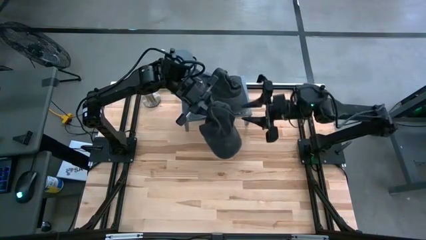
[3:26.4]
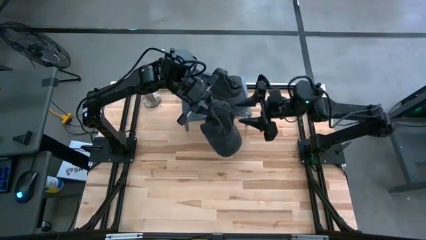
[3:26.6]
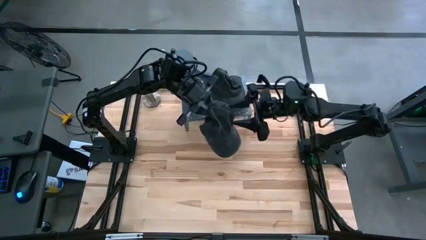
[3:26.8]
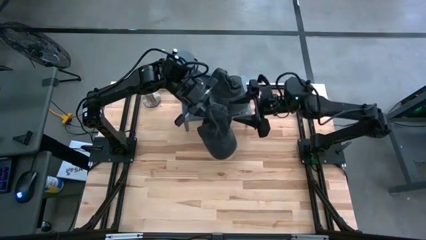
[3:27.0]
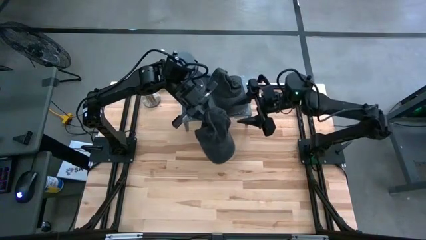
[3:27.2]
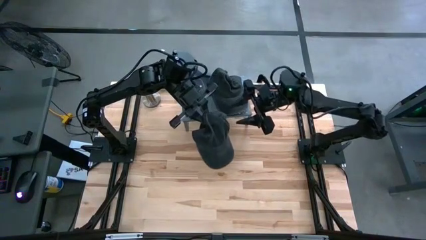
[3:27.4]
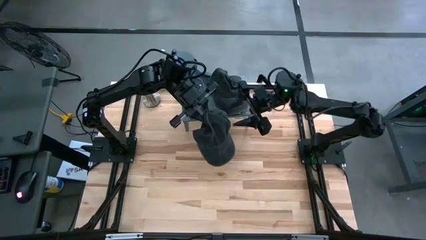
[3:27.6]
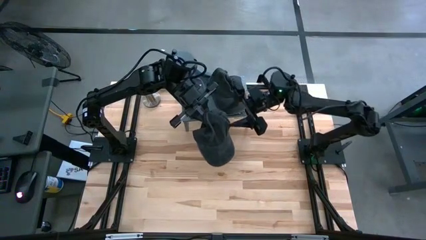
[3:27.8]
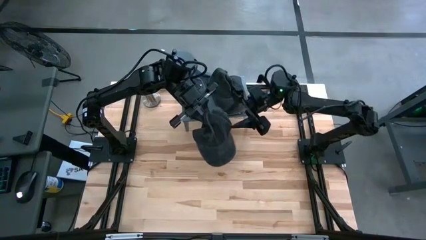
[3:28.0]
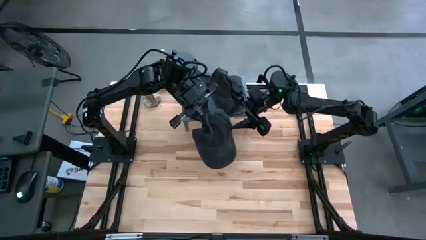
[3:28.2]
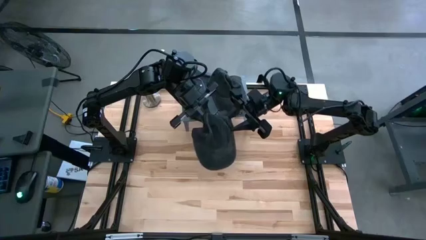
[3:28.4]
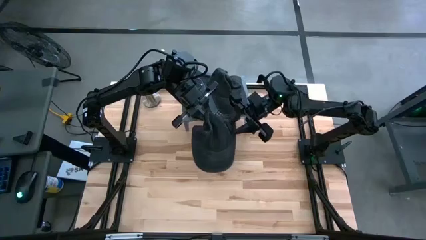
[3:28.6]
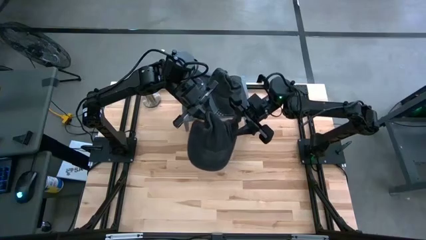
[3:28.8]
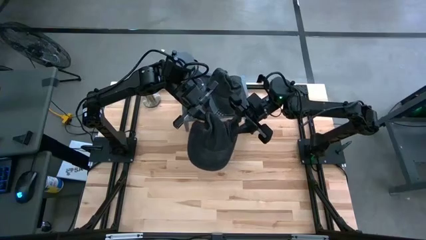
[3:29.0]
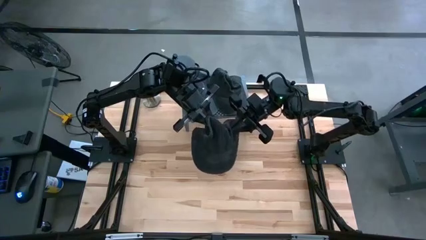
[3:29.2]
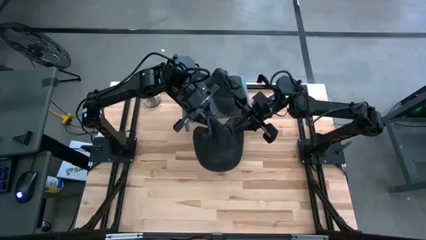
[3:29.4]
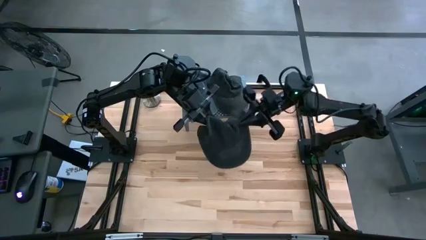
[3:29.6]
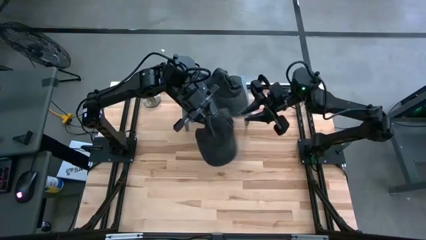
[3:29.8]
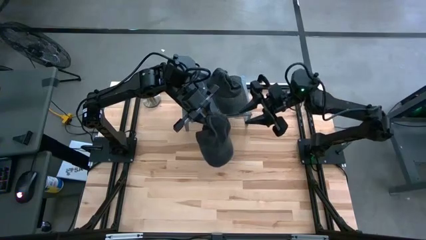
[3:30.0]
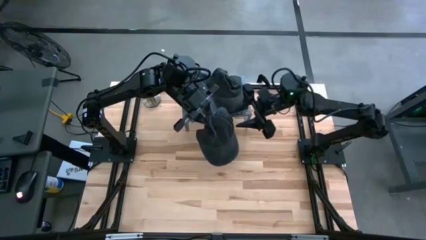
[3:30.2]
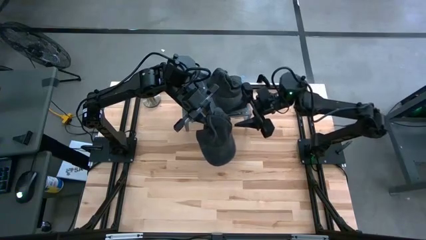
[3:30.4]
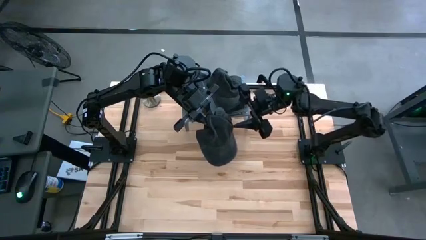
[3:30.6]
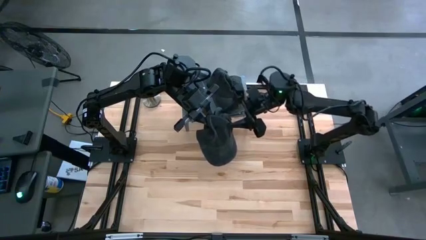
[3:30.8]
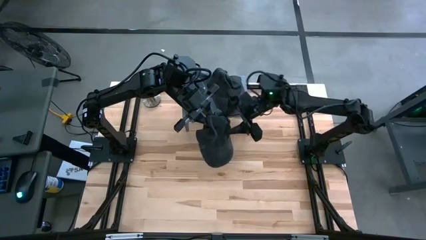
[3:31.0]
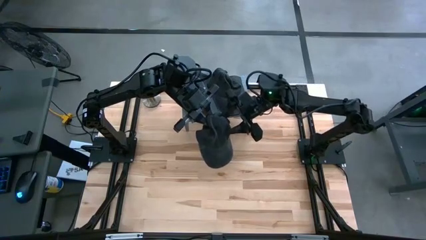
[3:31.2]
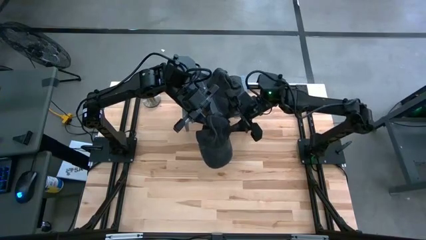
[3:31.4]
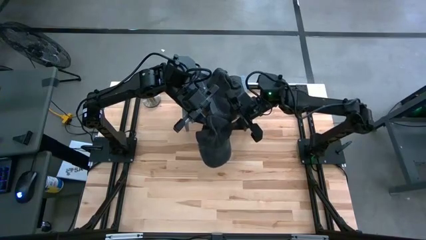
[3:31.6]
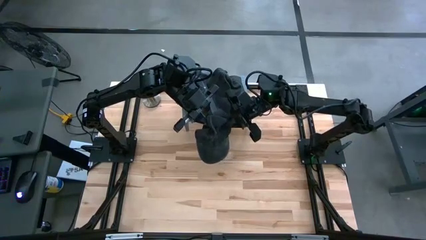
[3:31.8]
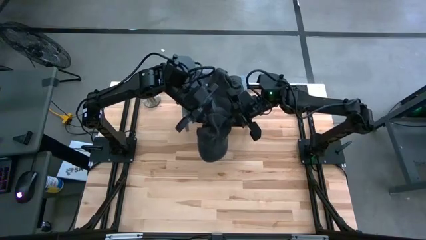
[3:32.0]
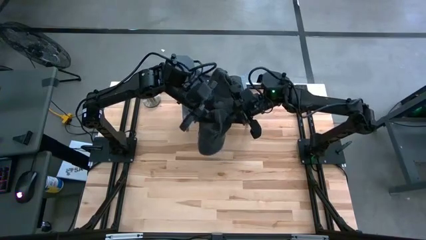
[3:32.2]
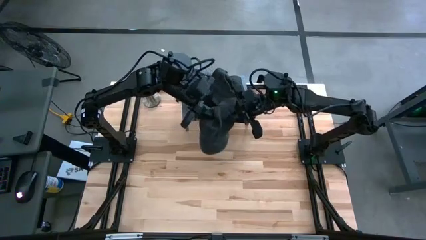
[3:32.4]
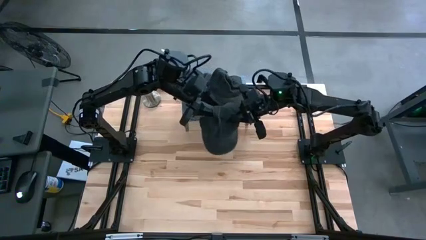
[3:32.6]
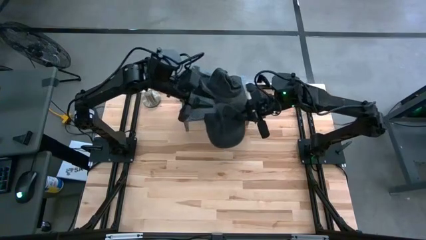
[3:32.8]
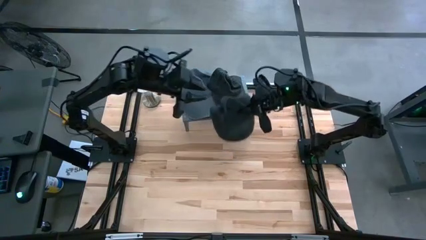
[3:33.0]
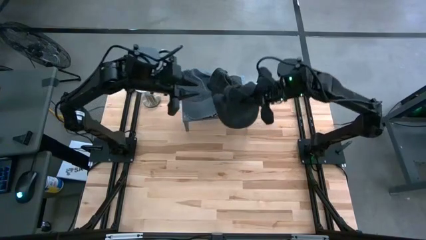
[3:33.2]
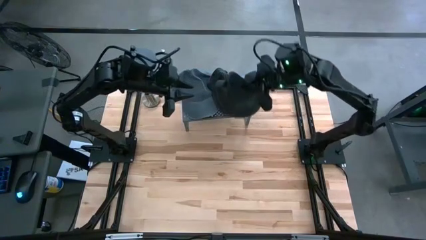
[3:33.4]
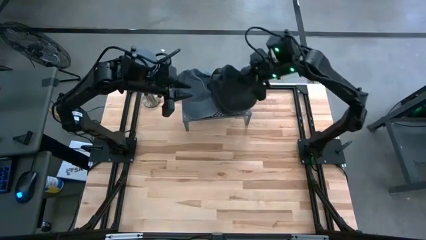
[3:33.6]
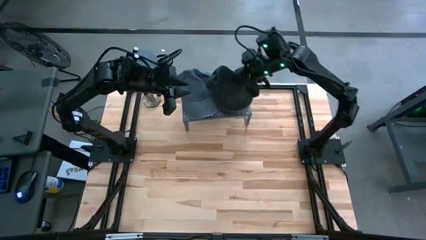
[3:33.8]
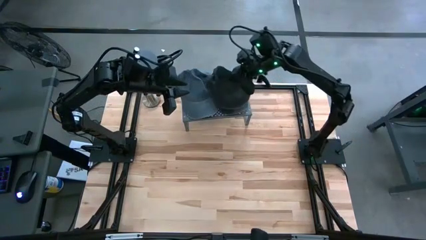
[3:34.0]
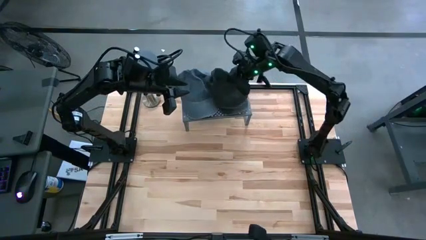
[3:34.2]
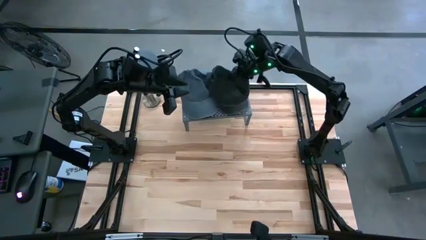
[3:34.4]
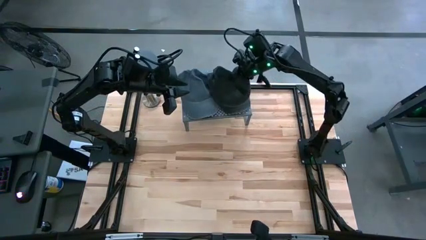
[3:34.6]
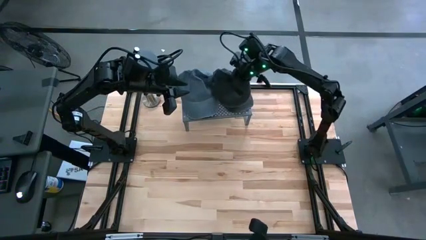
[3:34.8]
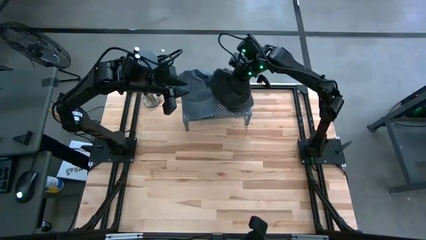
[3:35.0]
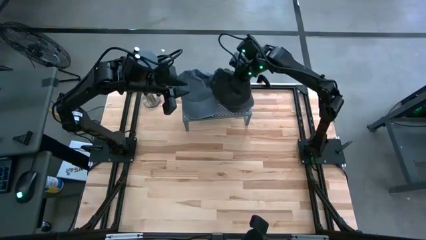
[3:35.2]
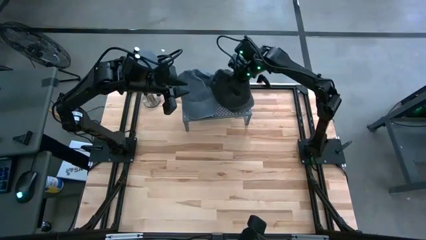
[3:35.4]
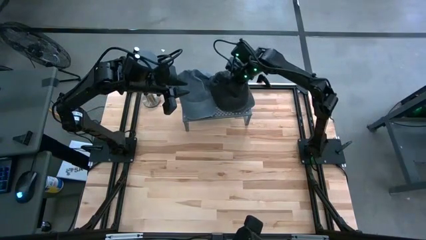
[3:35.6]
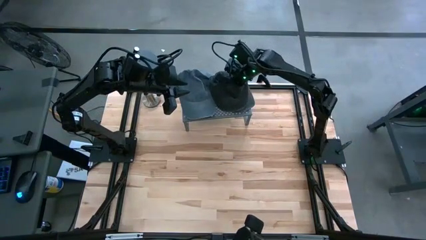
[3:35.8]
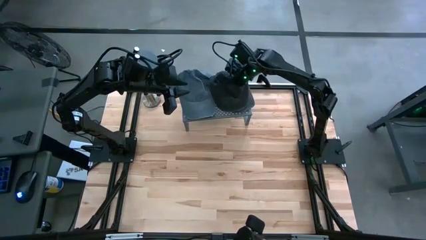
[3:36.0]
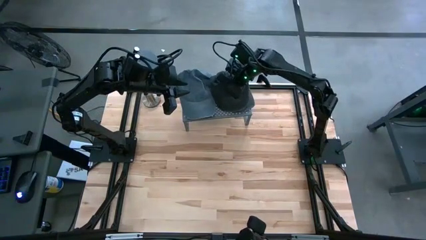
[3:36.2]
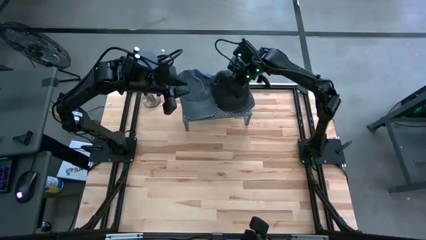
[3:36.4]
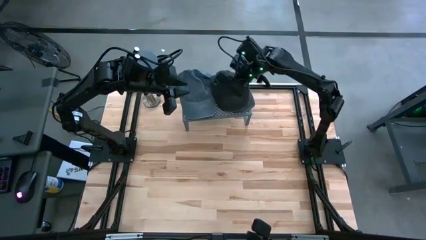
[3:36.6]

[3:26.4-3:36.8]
Task: Pick & Place hat
Stack the black cap on top of the other black cap

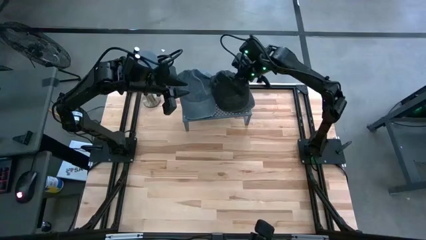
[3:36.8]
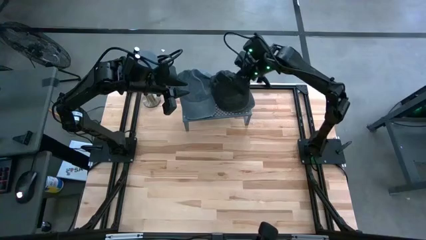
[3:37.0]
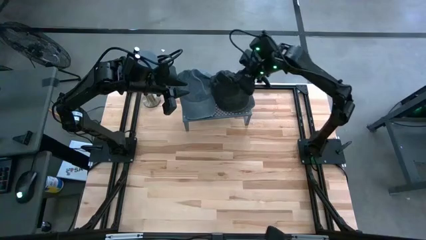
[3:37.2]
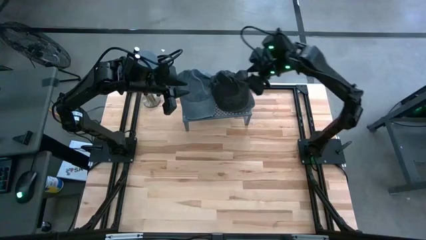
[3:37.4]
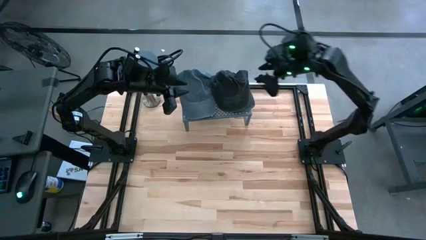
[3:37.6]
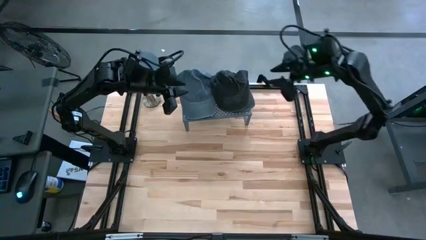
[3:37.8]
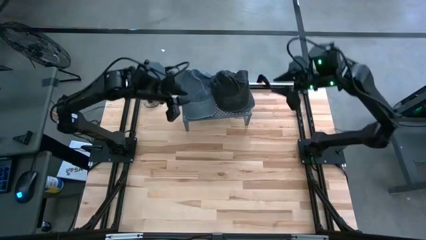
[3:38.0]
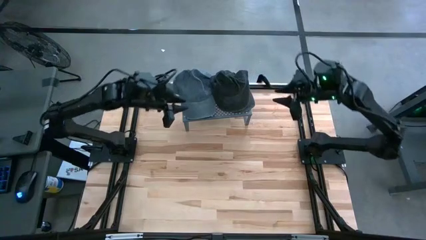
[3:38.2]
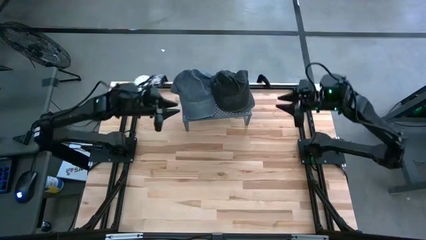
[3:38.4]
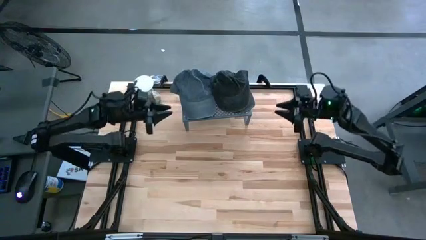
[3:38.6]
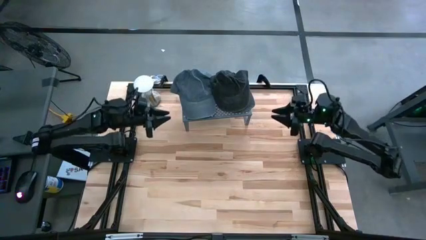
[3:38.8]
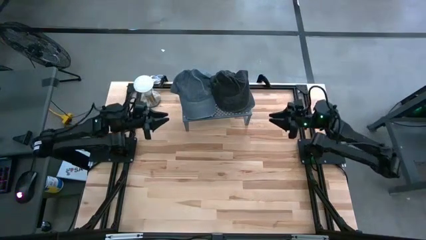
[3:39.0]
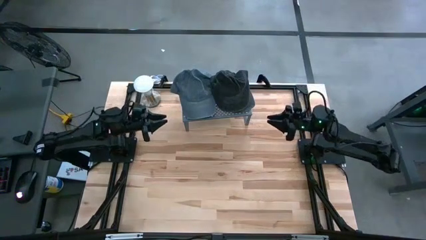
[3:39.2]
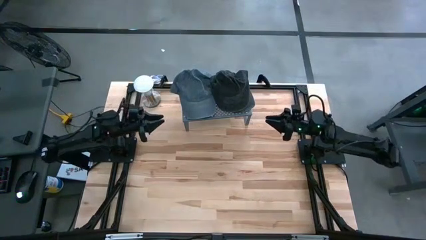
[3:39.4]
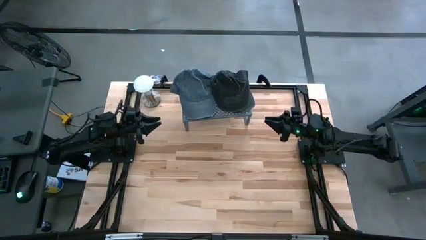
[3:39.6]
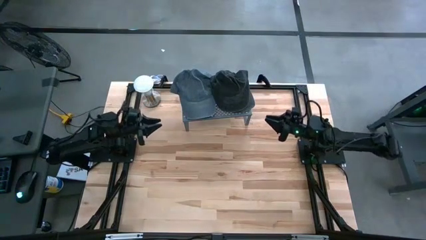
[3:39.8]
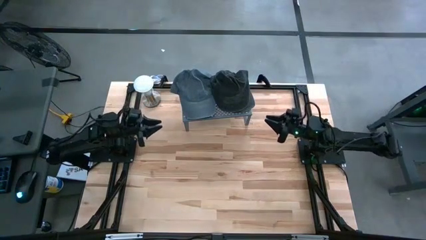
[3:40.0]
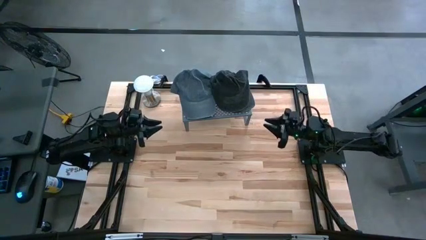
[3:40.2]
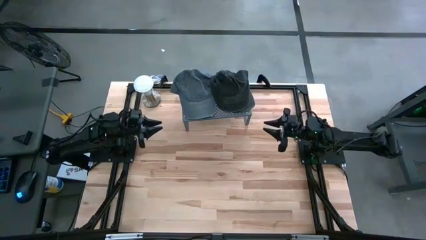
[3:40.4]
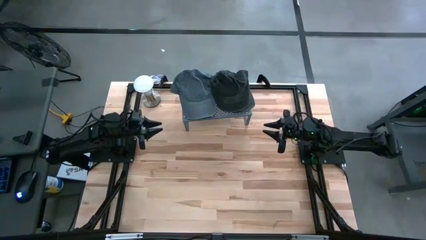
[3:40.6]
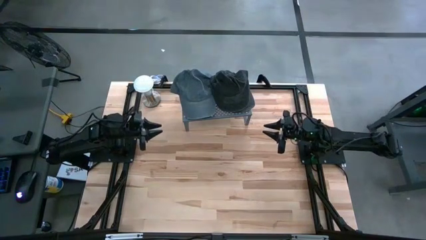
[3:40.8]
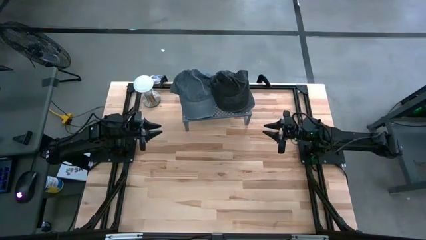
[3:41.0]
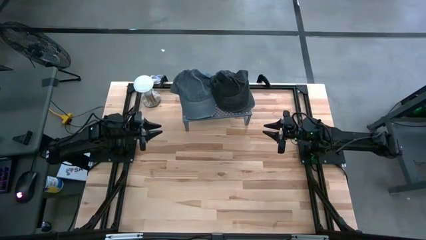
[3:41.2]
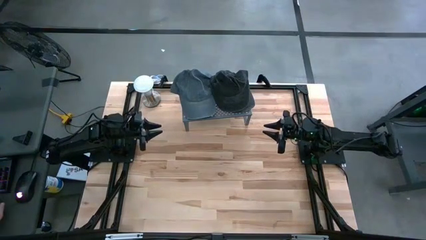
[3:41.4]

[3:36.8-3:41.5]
Return to Home Position

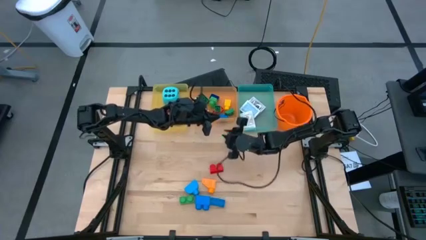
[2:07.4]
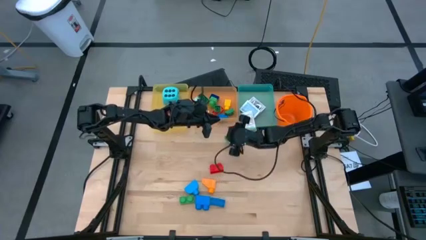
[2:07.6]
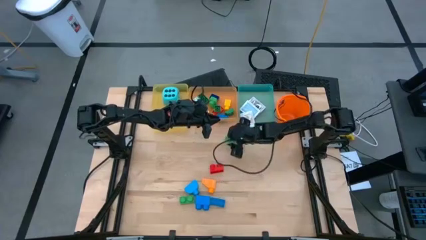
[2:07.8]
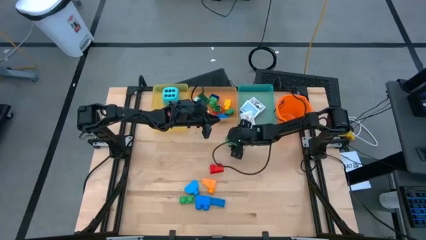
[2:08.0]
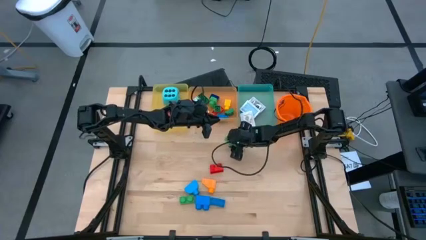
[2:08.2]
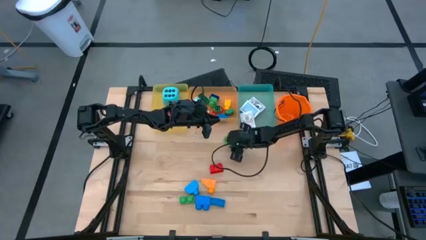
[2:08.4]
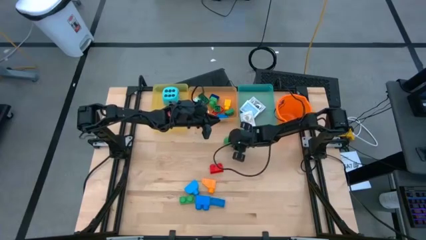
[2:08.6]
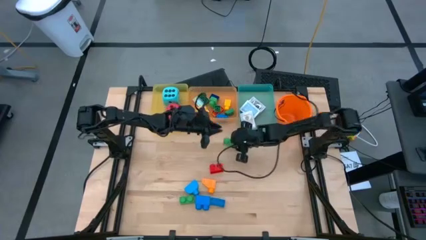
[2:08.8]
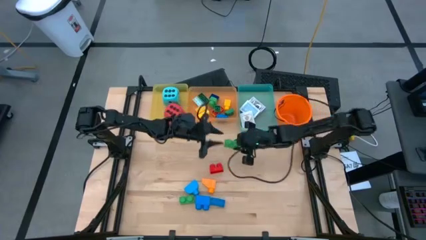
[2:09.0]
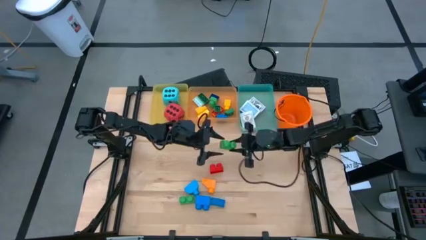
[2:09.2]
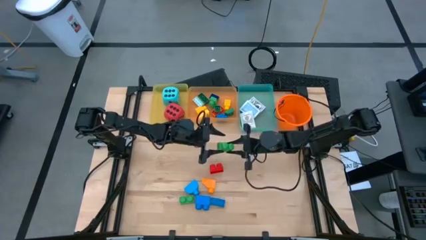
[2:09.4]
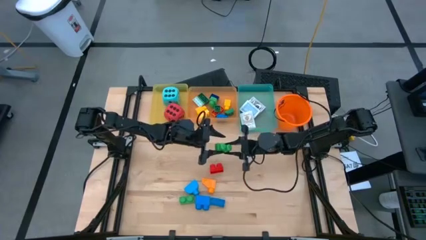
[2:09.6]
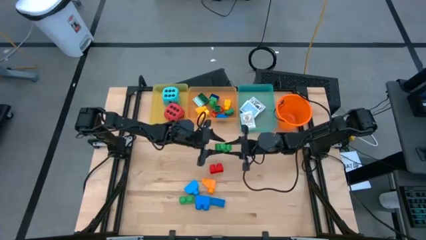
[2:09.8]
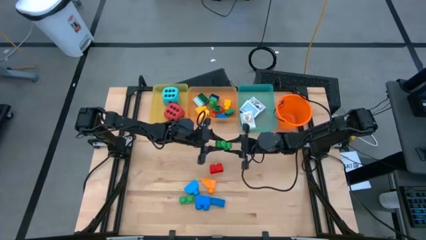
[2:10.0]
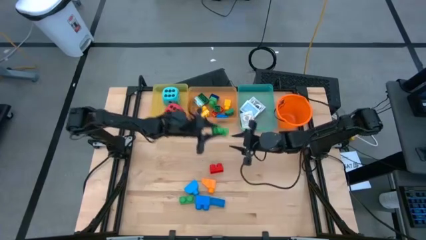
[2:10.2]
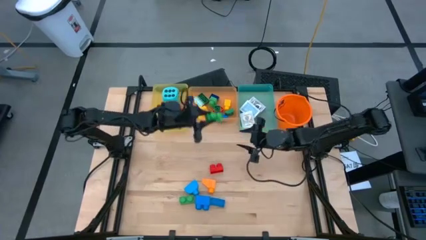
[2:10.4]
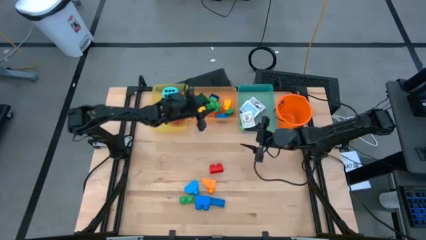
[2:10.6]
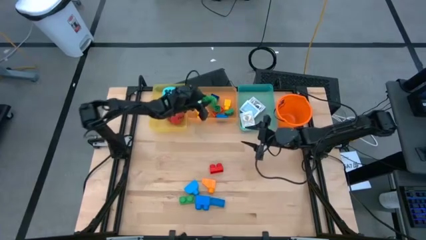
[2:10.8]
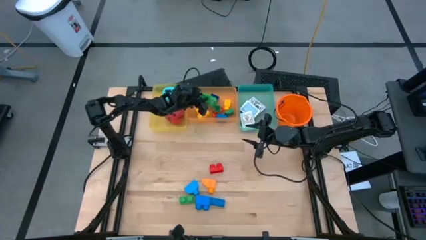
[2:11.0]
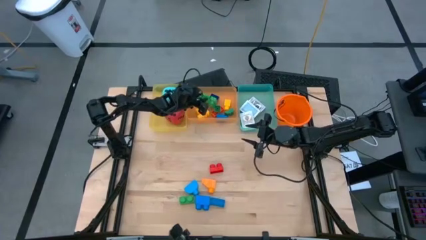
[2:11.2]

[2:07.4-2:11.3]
Task: Pick & Place Toys
Put the green game piece into the orange bin
